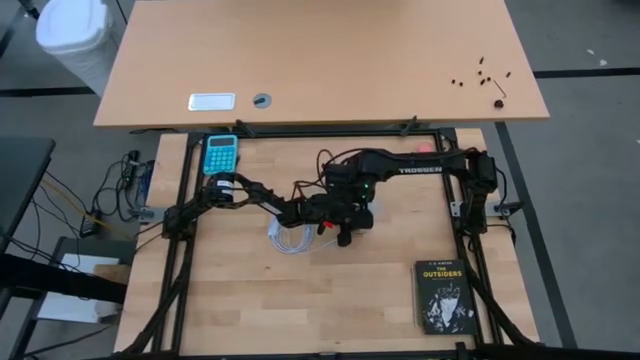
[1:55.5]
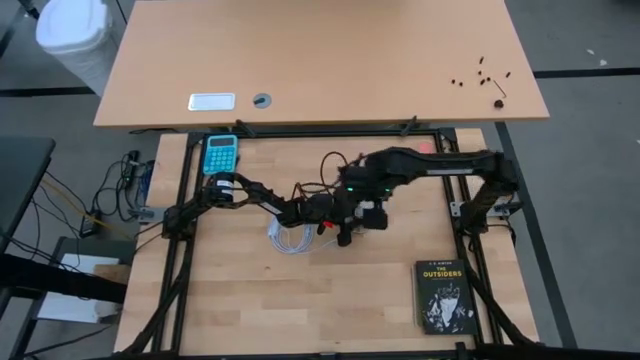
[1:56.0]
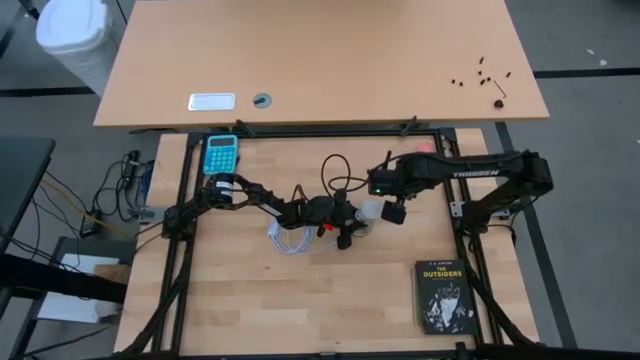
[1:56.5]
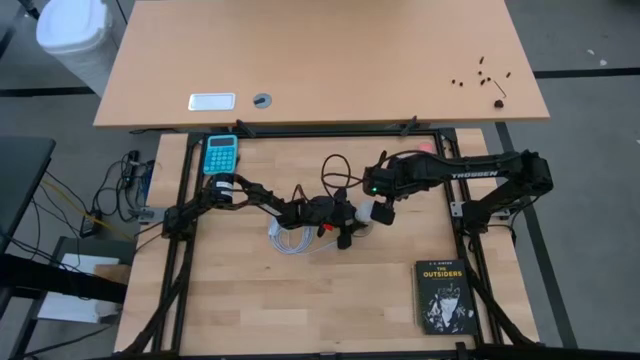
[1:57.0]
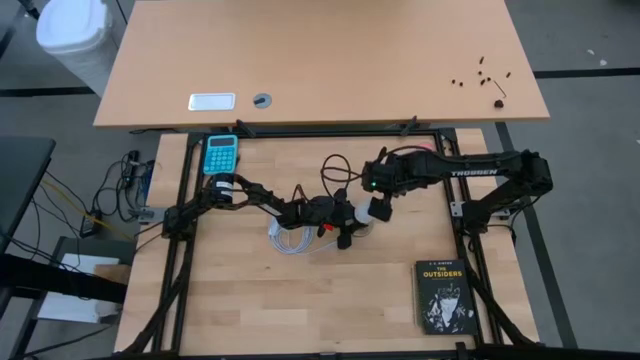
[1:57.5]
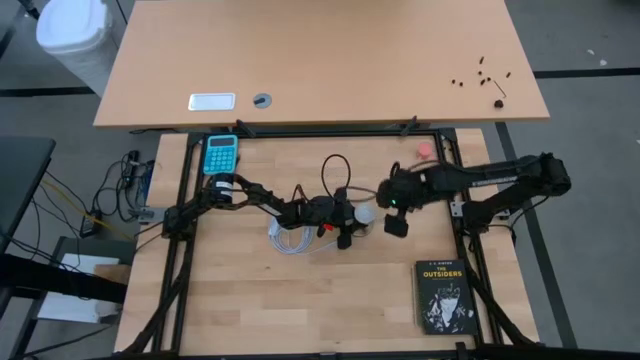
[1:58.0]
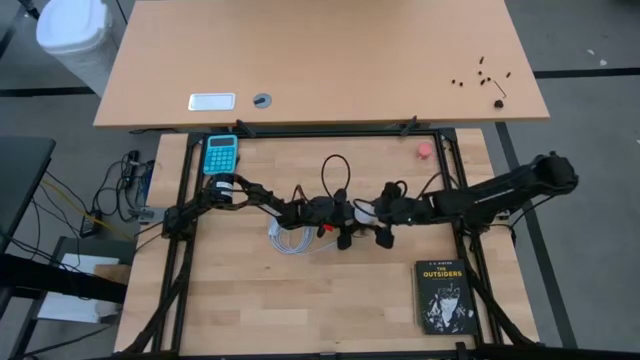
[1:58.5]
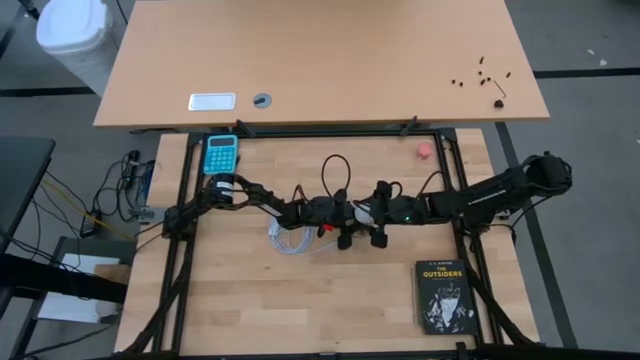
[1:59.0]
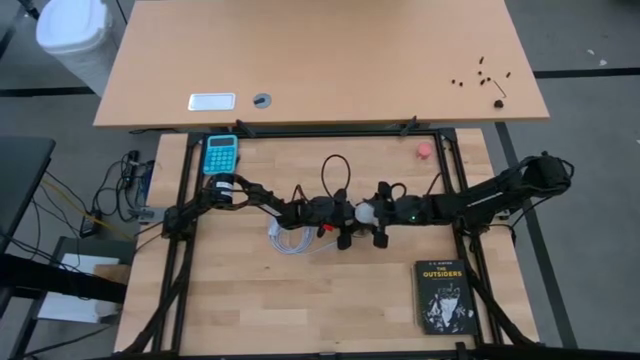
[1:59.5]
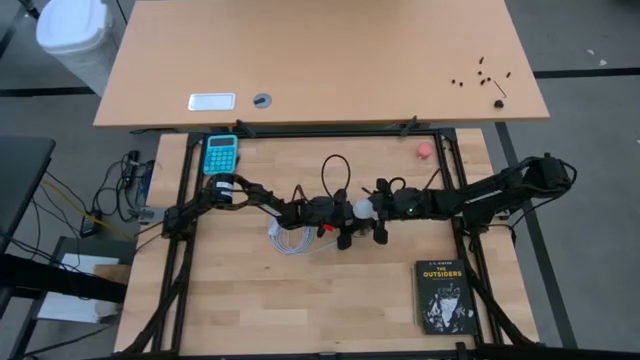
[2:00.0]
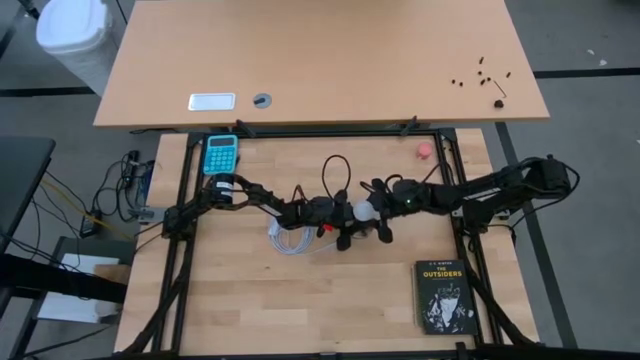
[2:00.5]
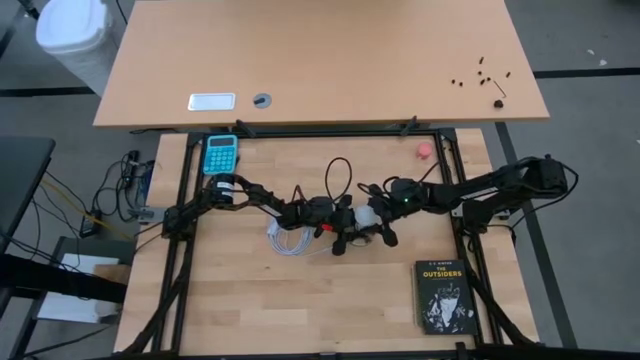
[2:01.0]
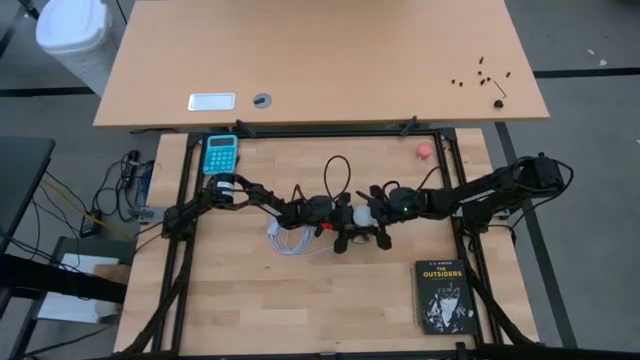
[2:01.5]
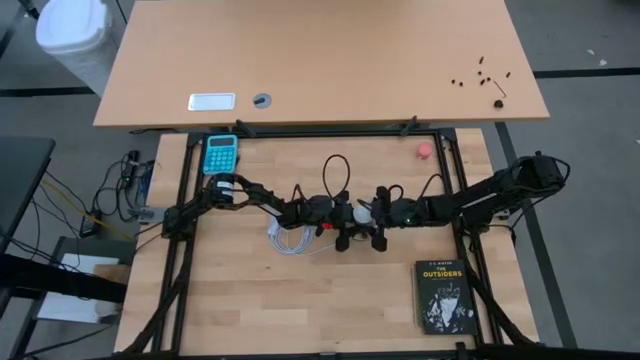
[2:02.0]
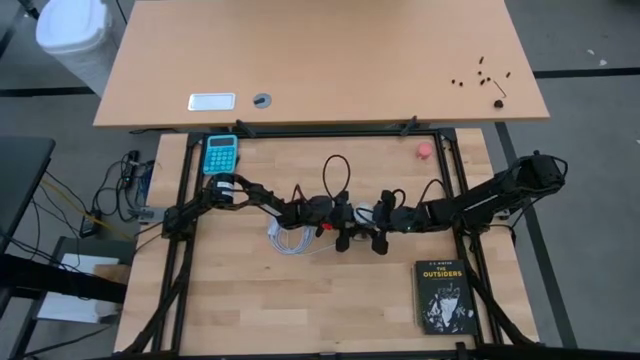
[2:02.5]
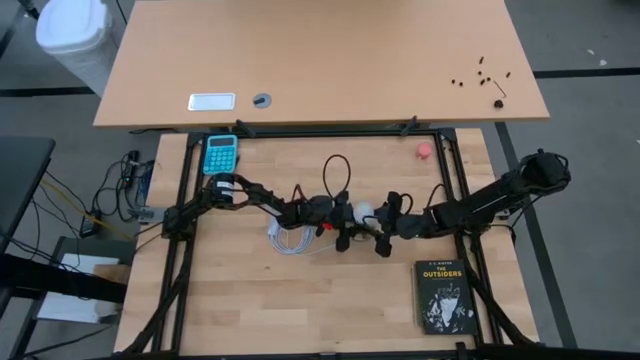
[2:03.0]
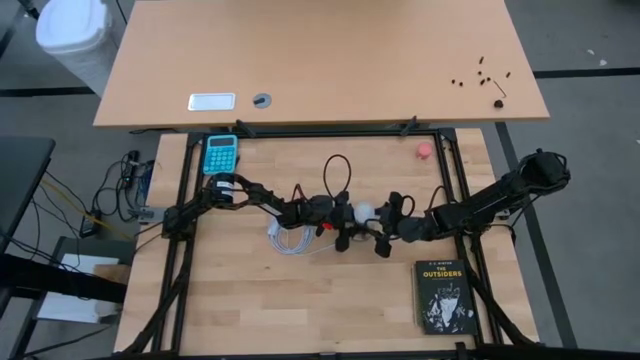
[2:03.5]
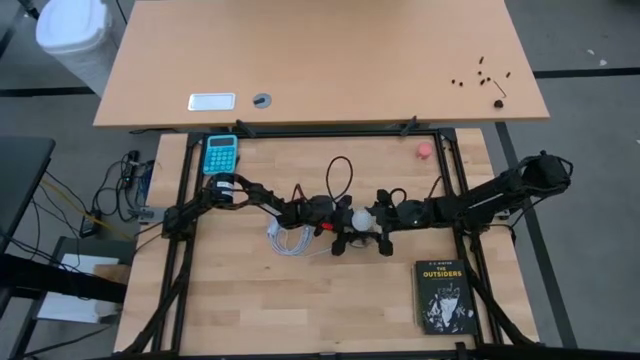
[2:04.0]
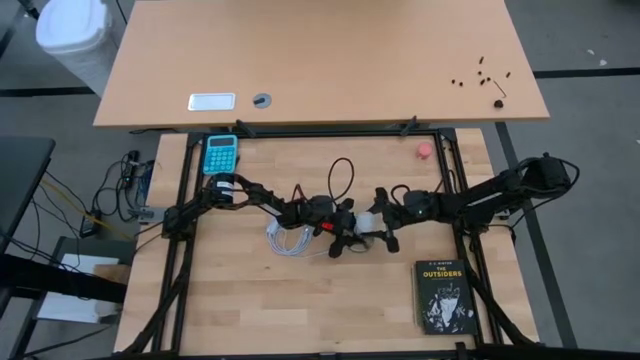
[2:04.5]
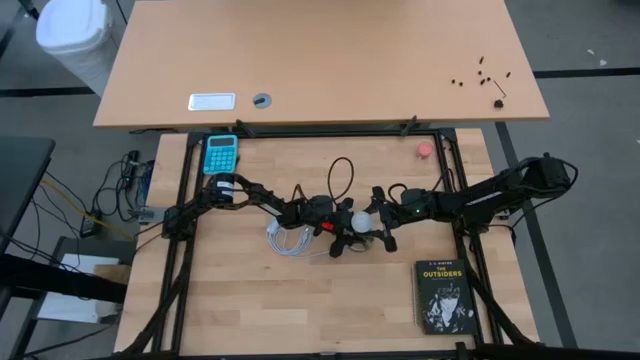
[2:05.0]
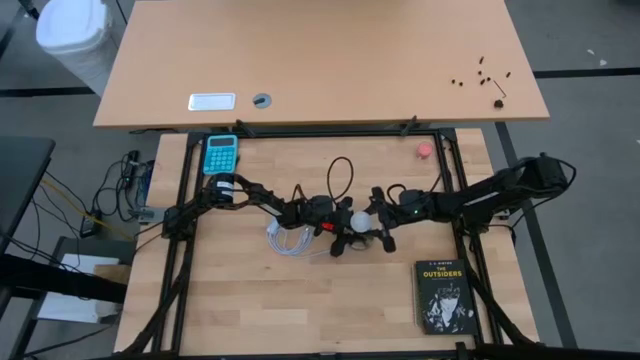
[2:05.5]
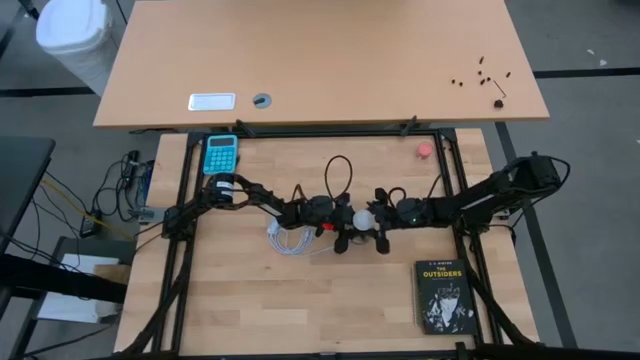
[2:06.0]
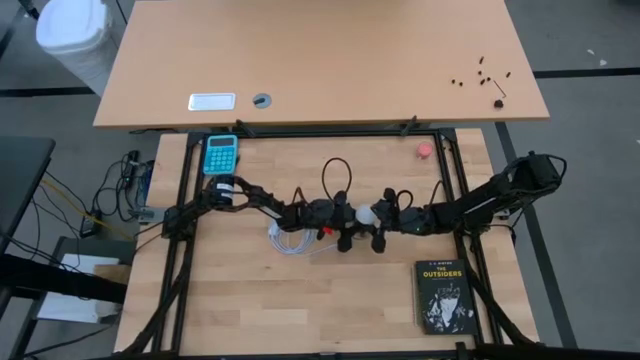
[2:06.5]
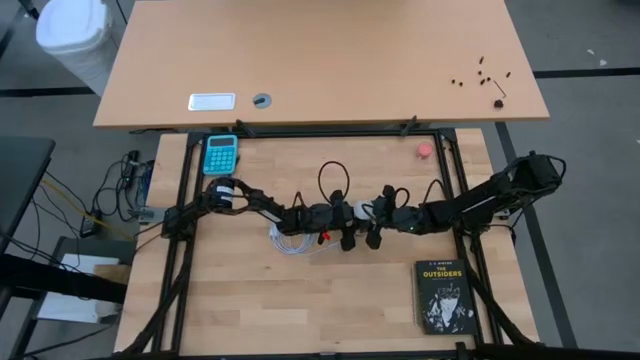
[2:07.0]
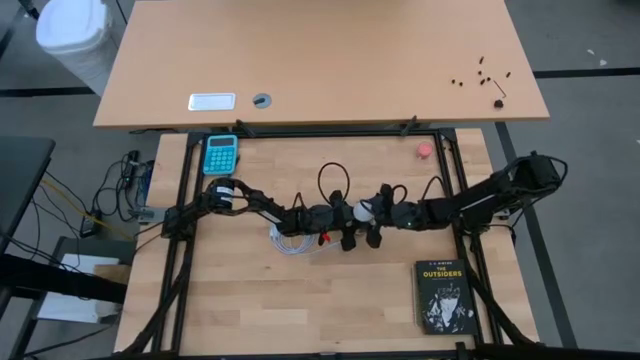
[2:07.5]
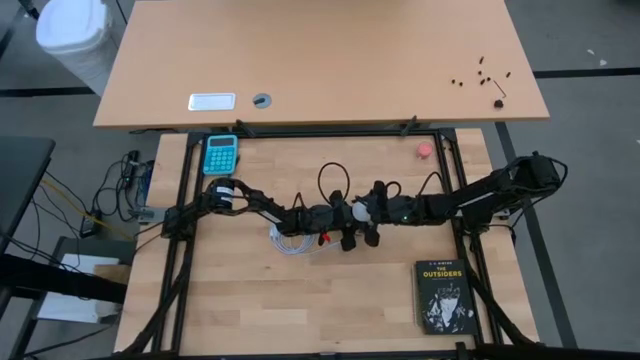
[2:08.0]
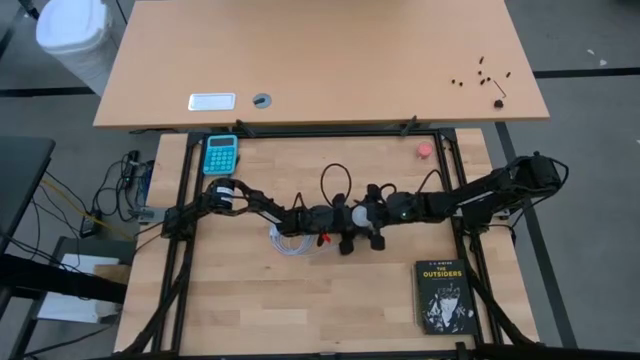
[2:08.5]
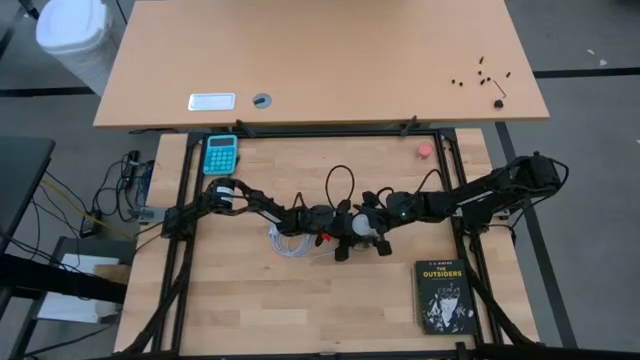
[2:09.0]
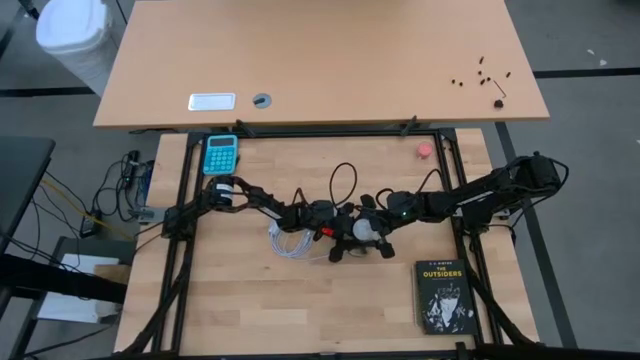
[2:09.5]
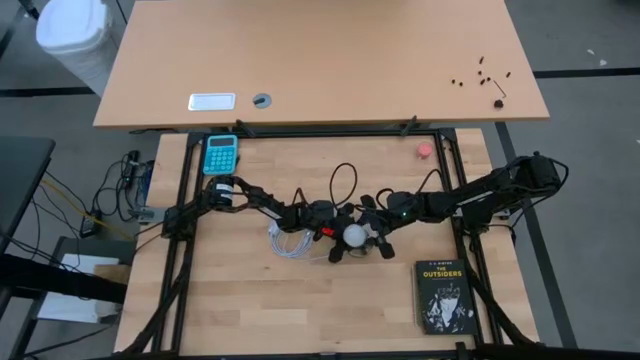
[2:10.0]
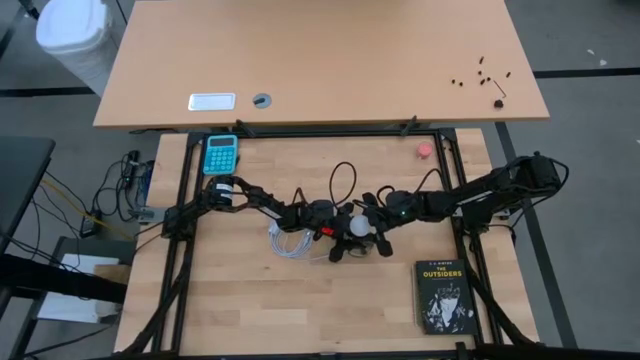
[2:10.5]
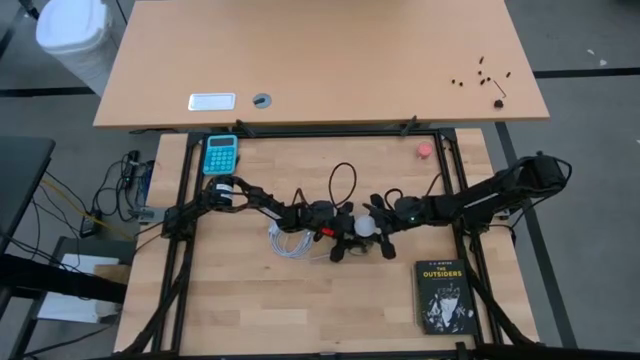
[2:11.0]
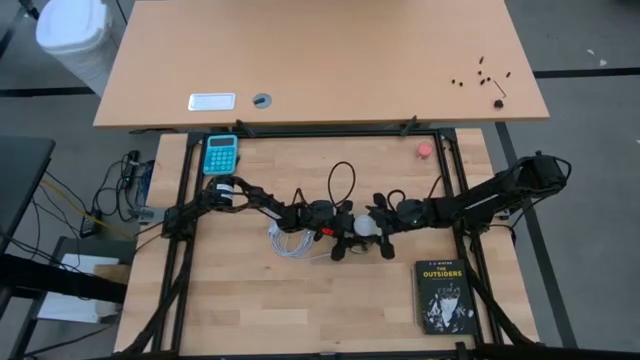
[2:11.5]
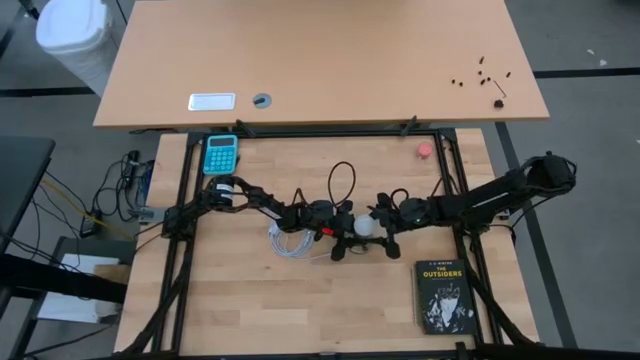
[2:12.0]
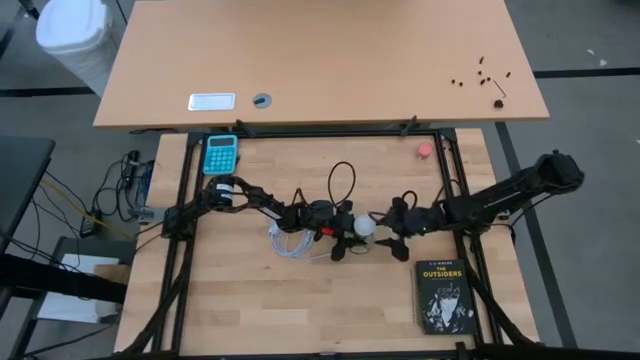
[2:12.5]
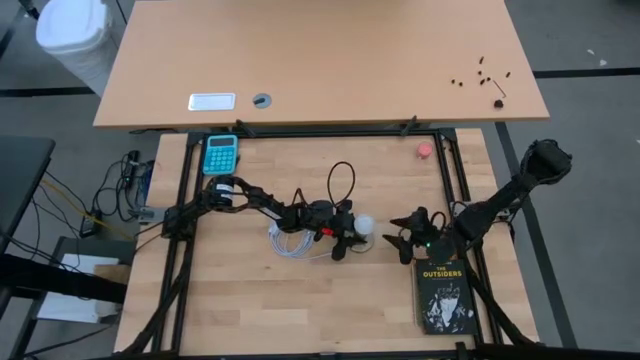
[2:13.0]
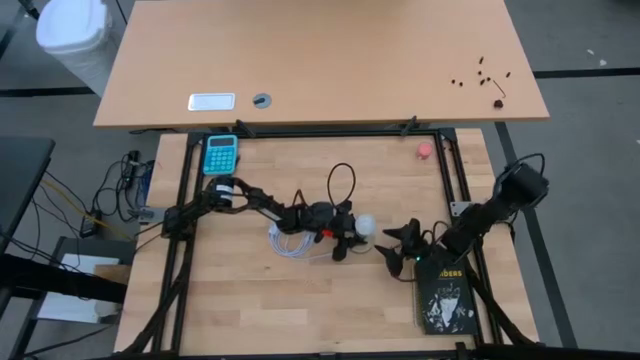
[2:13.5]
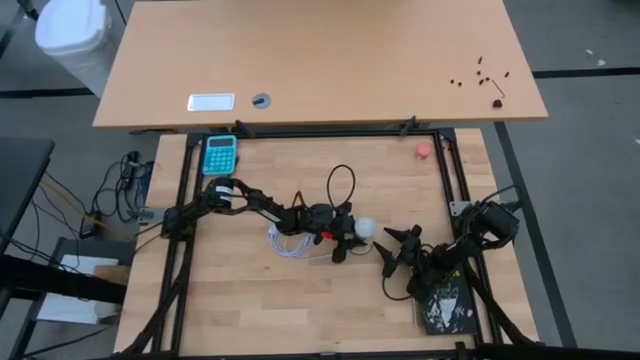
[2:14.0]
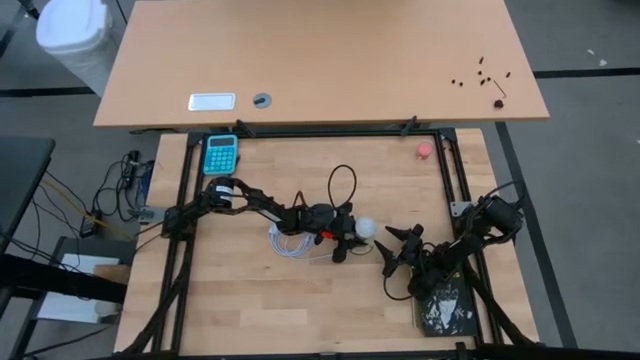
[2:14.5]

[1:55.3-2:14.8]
Task: Screw lightbulb
Insert the lightbulb into the lamp

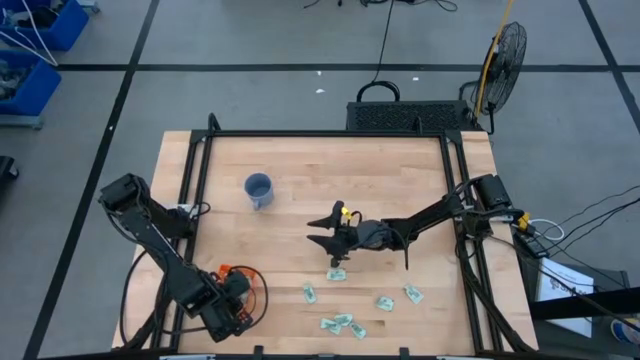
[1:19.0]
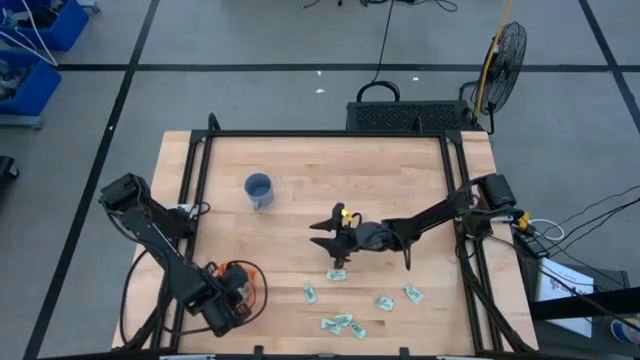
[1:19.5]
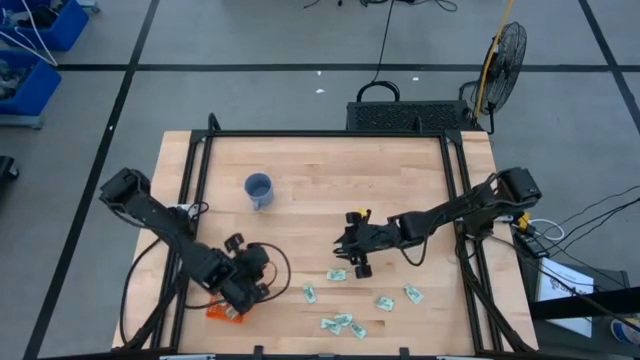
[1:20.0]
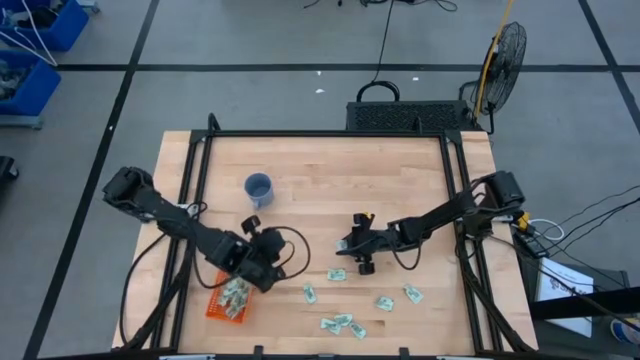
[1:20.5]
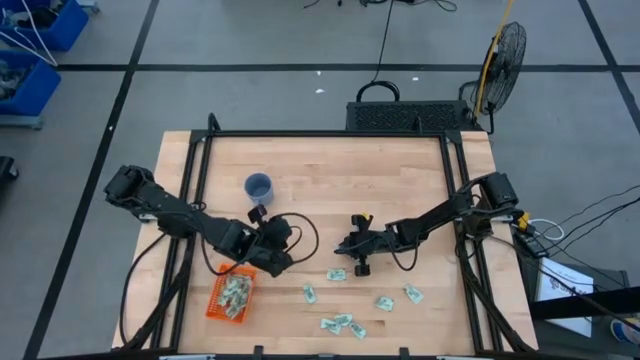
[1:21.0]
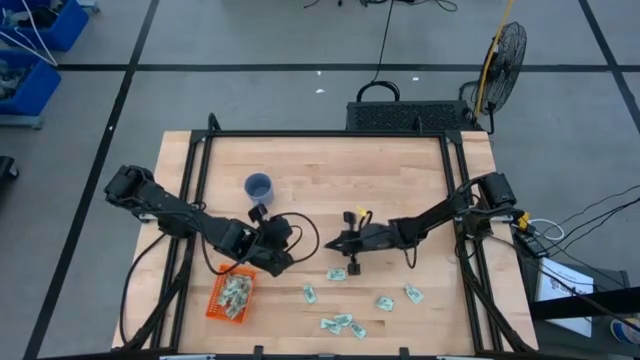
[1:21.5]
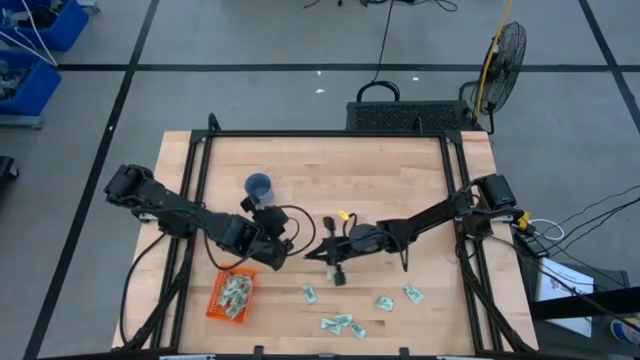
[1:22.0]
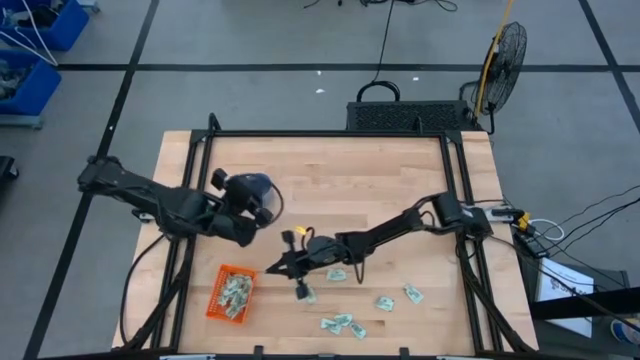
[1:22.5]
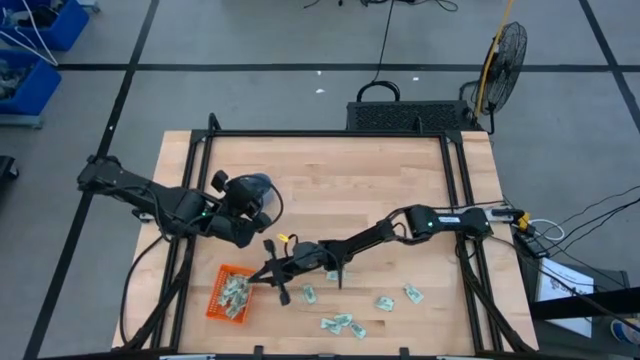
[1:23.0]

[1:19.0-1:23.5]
Task: Pick and place Stevia / Truvia into bins
Put the stevia packet into the orange bin
